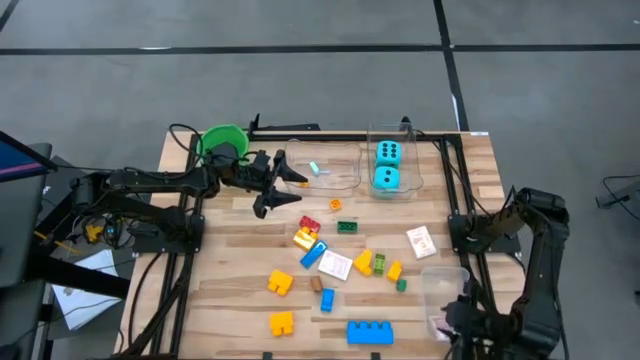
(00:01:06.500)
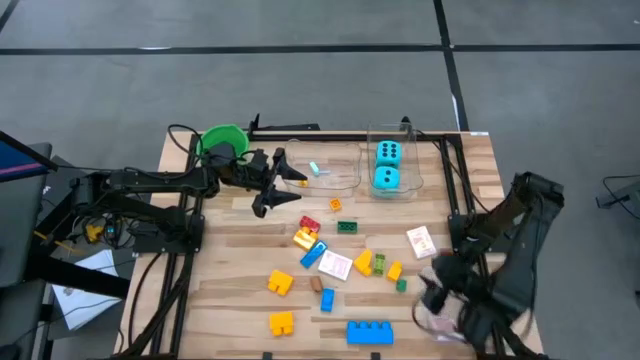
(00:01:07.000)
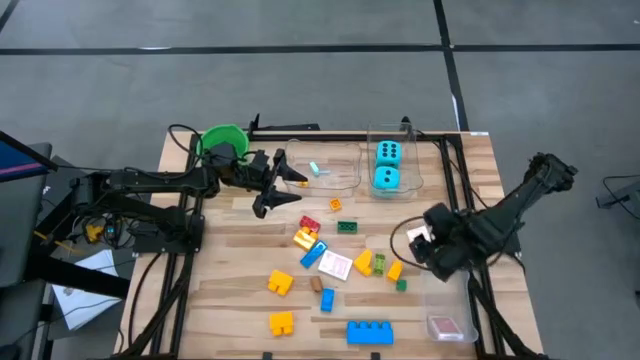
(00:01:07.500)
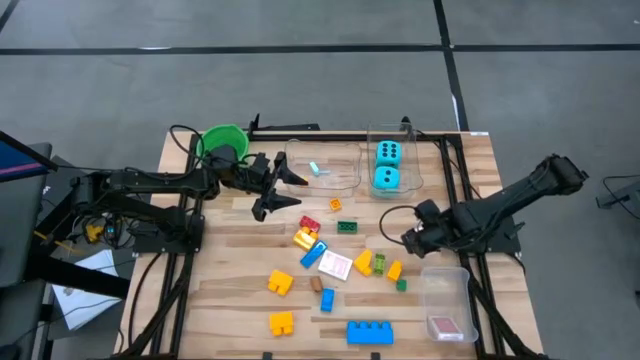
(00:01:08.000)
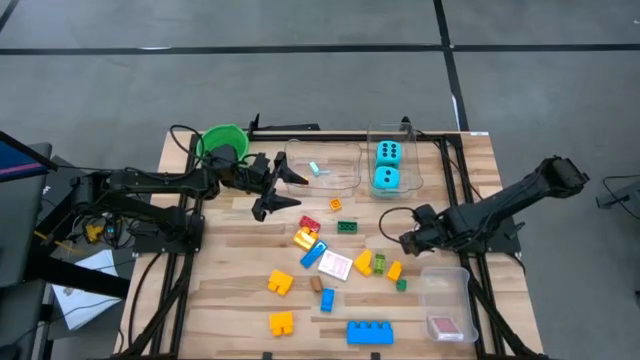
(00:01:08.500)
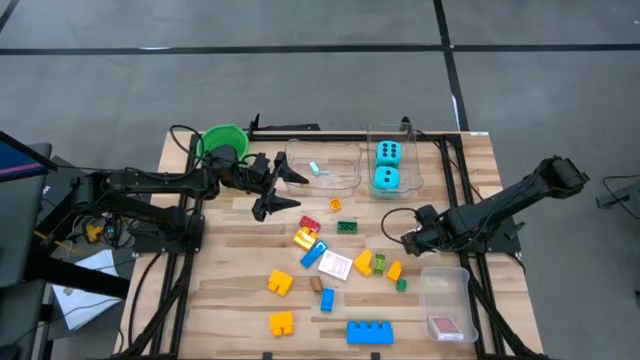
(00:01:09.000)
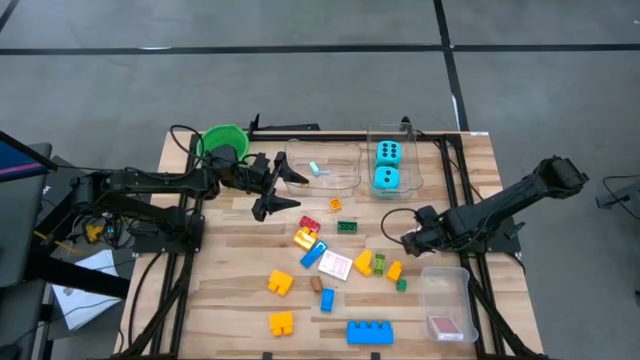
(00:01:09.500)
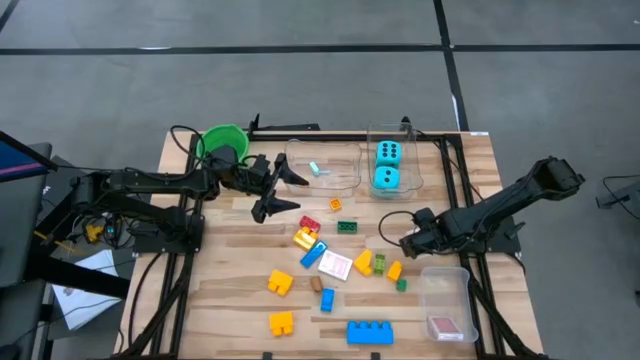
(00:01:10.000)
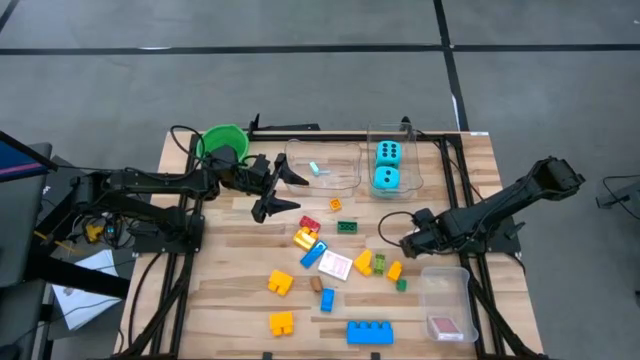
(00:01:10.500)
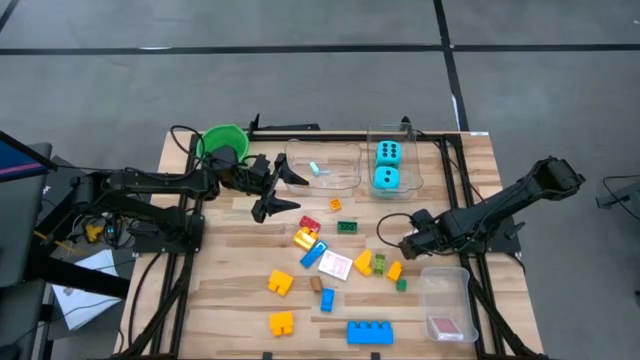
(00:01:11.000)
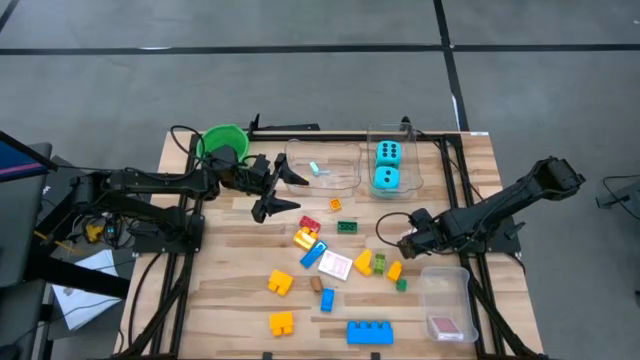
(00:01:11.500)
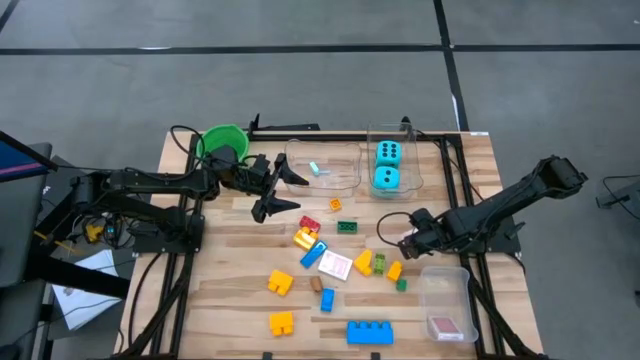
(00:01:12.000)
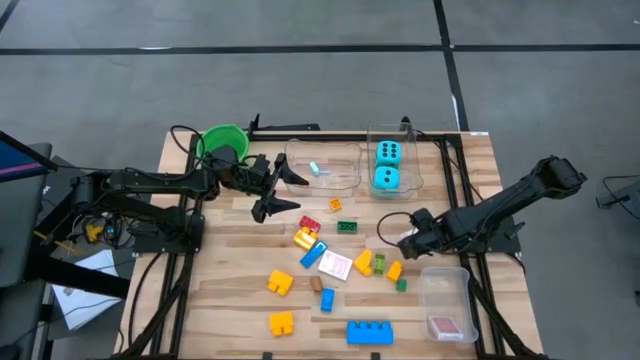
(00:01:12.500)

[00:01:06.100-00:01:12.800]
Task: Pick & Place Toys
Put the orange deck of cards into the white bin

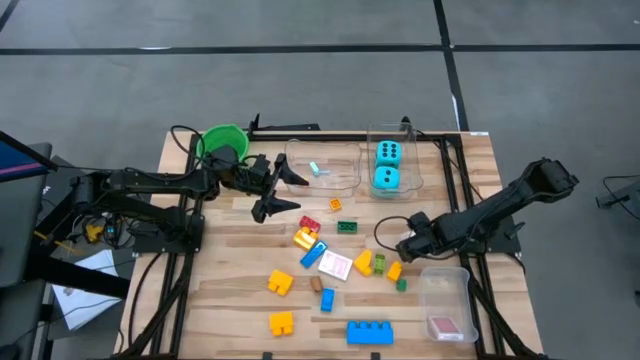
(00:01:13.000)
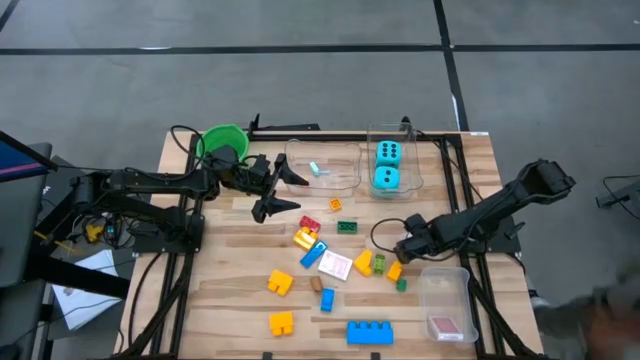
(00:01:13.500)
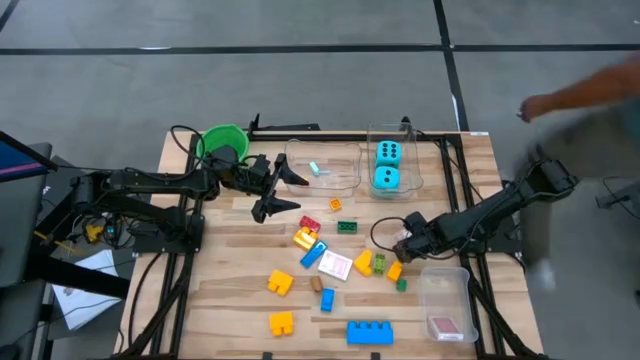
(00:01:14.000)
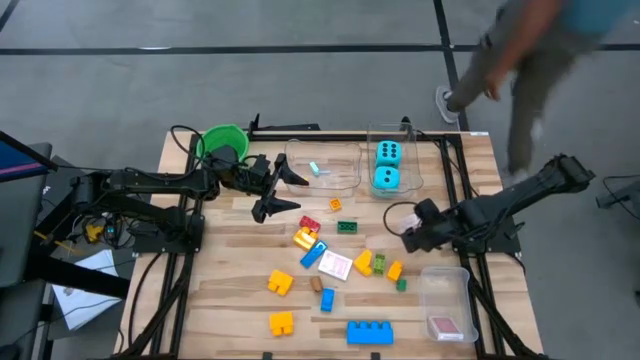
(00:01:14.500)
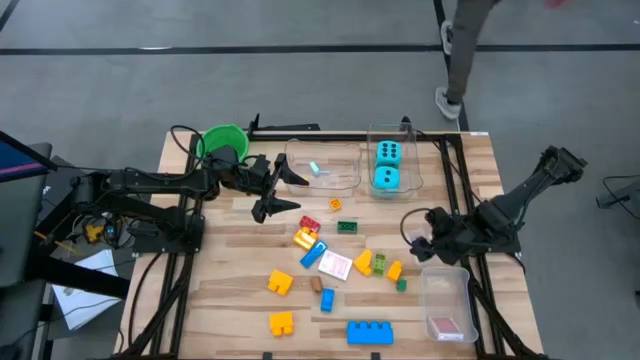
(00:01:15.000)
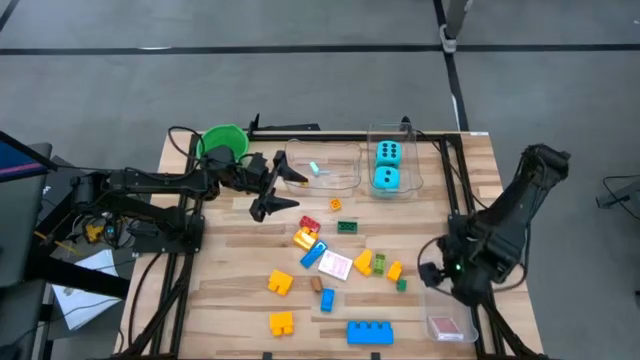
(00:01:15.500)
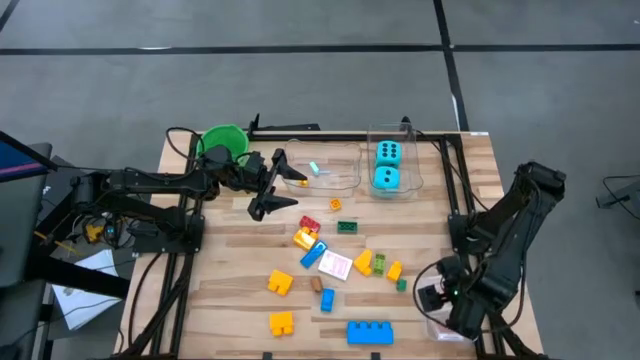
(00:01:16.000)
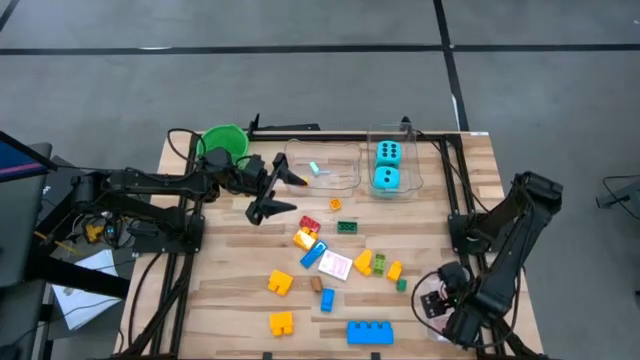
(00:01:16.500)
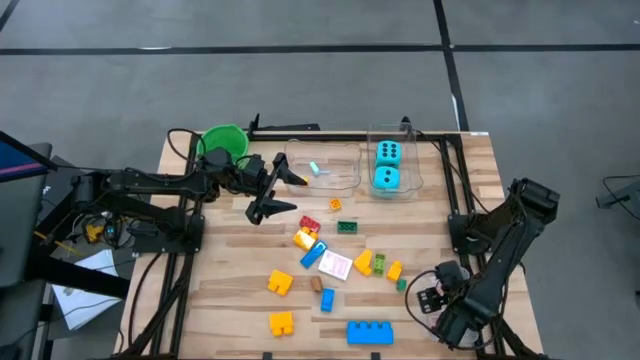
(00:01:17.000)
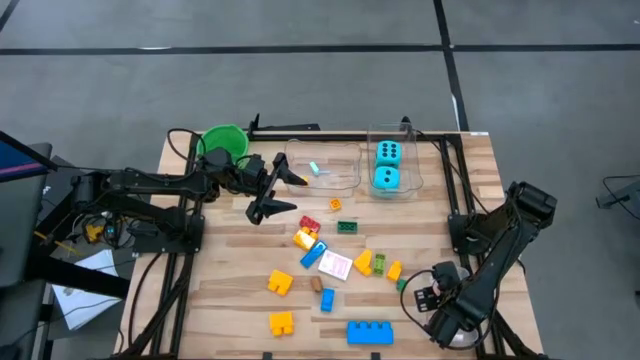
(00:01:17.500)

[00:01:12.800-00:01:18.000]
Put the orange deck of cards into the white bin

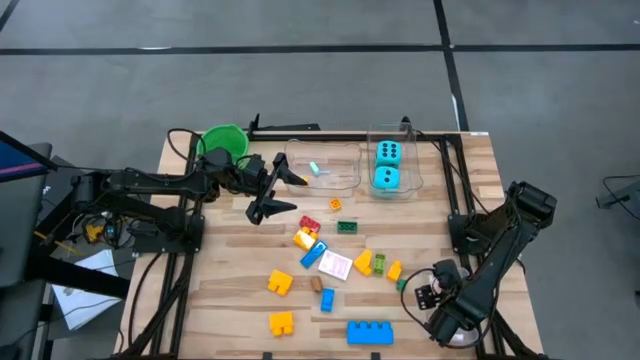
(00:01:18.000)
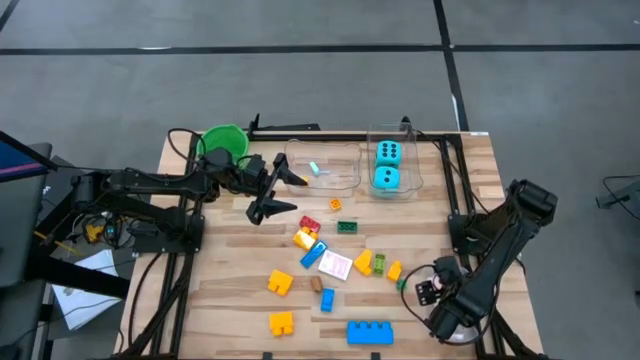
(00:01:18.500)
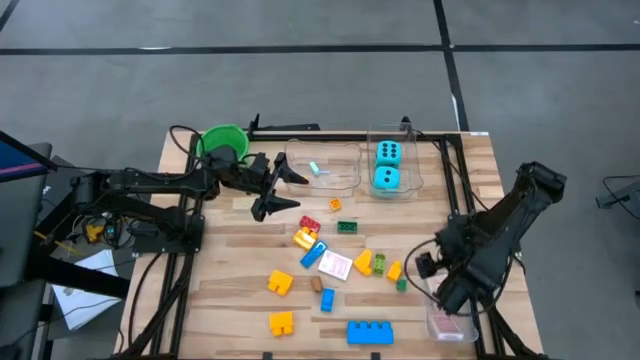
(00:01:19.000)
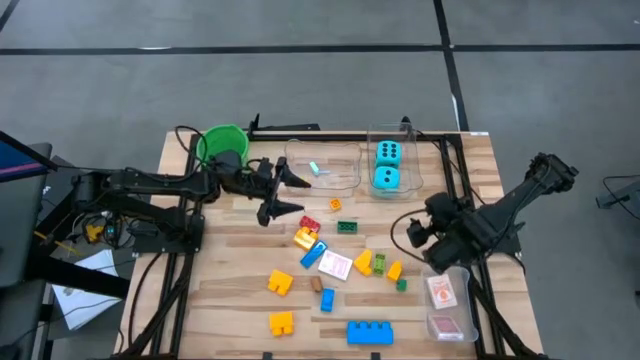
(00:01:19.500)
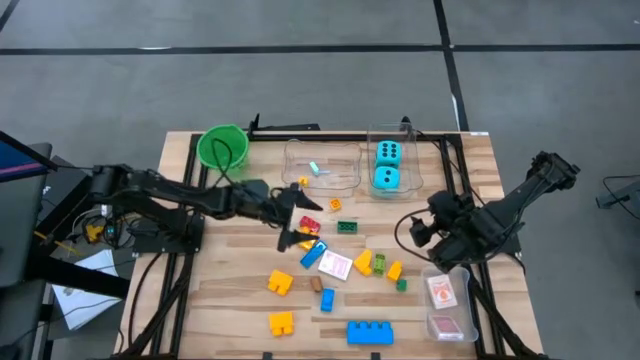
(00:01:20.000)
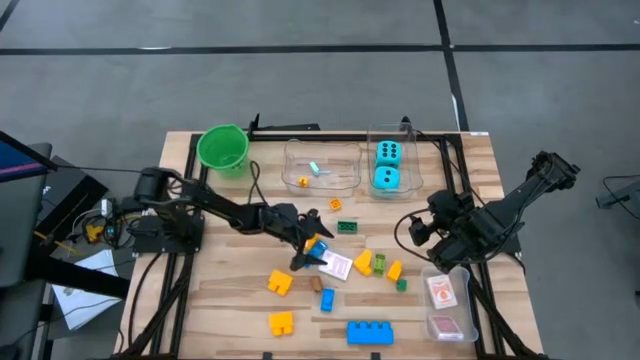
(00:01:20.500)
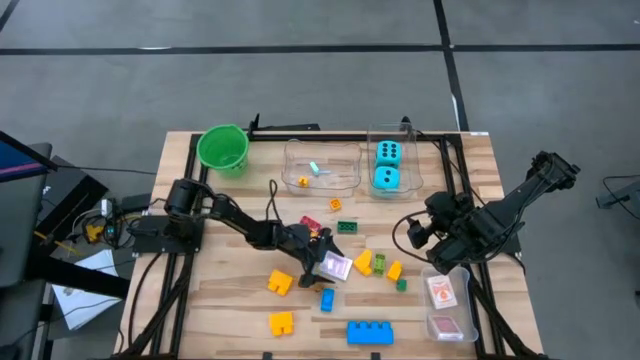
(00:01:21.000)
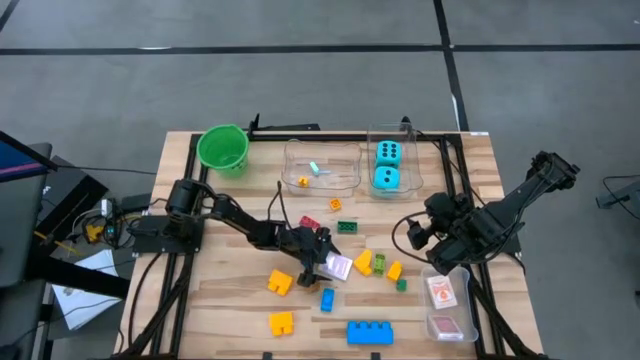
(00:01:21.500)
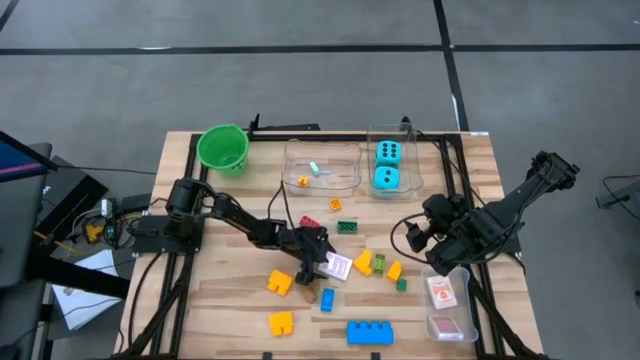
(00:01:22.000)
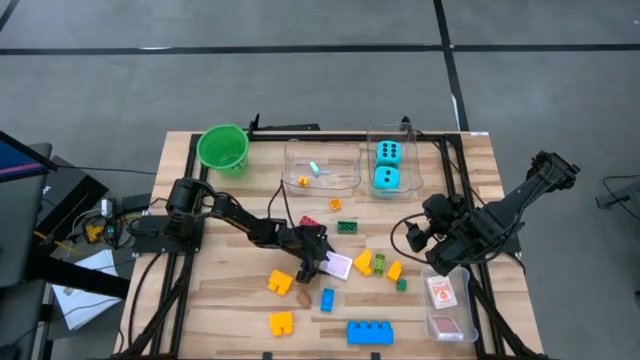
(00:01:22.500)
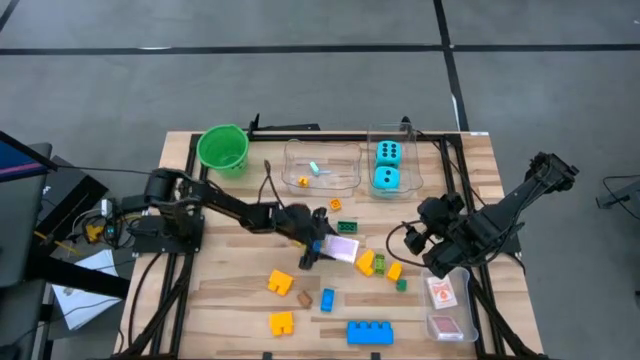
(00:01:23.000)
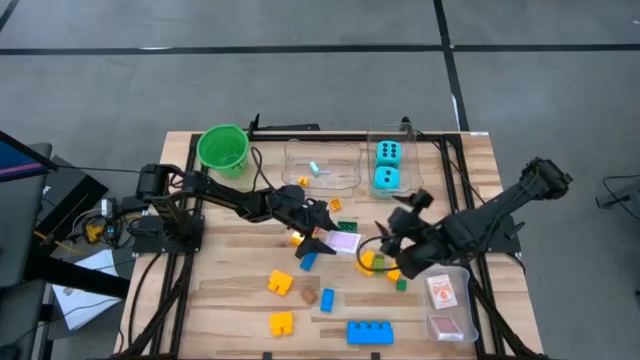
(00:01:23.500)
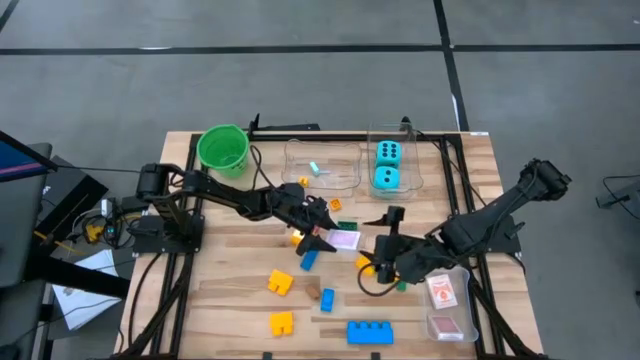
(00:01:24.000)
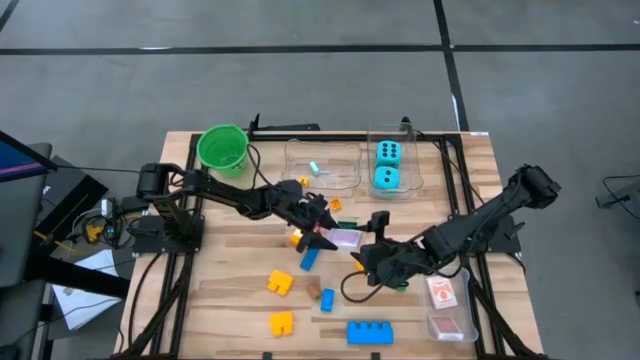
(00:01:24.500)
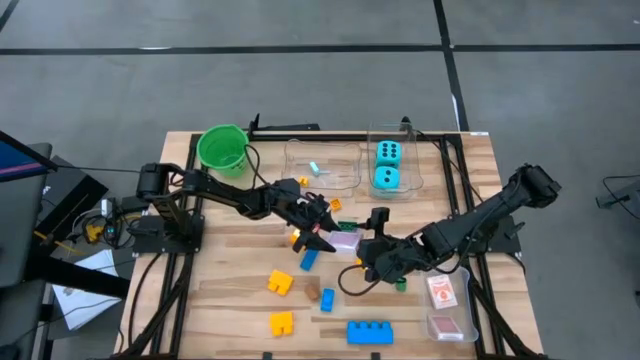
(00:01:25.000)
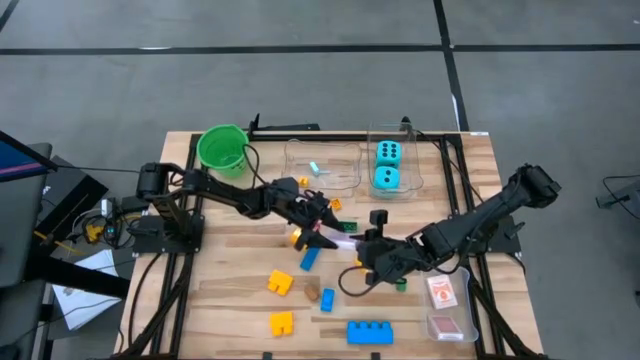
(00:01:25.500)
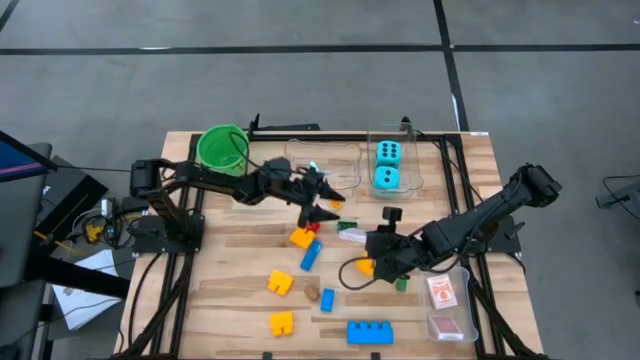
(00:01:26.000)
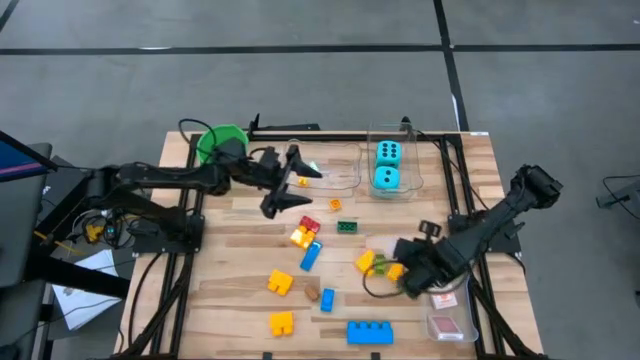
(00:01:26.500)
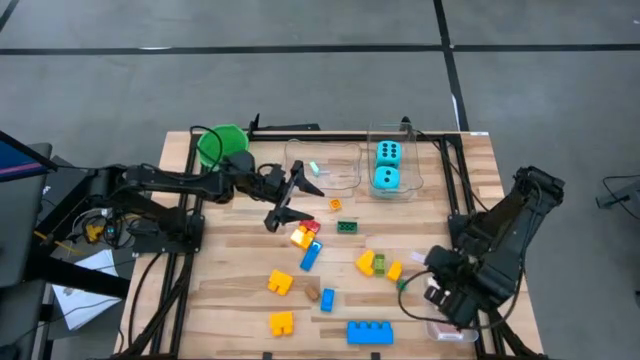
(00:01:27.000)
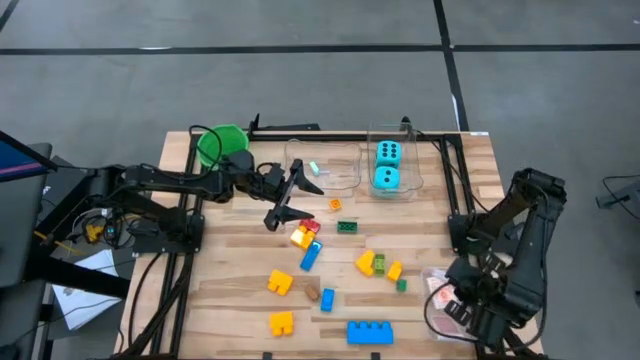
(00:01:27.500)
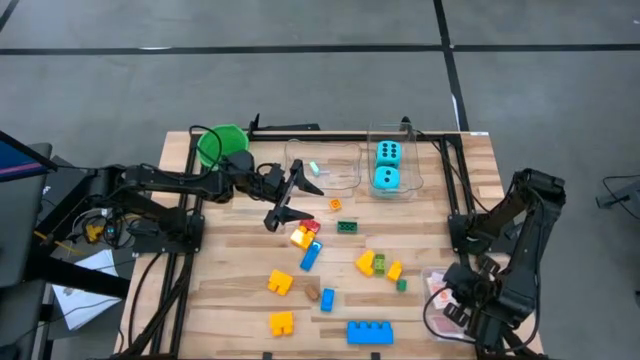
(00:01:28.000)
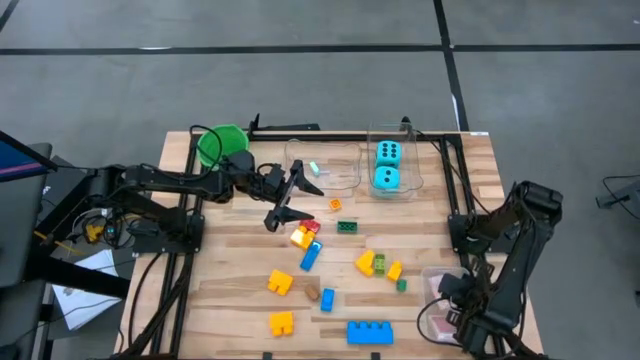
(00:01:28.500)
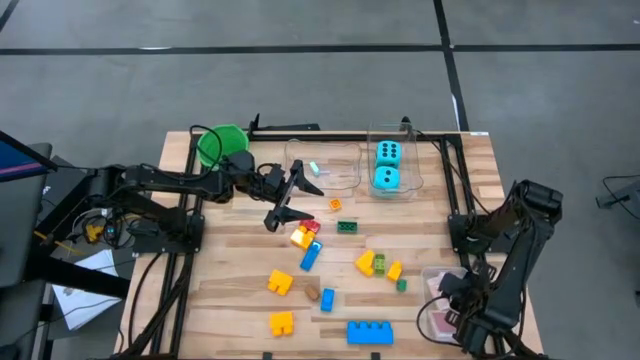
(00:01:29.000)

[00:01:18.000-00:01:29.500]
Put the pink deck of cards into the white bin
